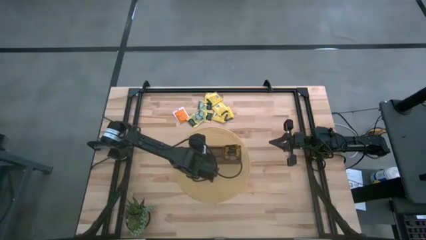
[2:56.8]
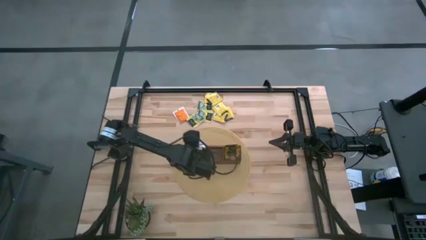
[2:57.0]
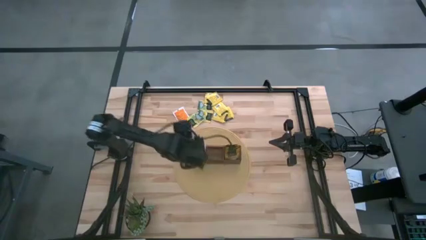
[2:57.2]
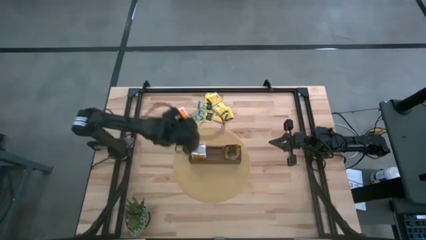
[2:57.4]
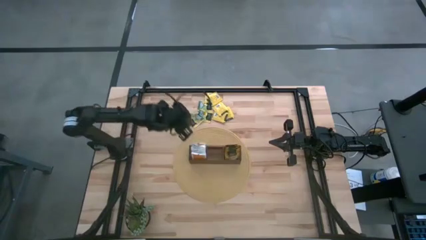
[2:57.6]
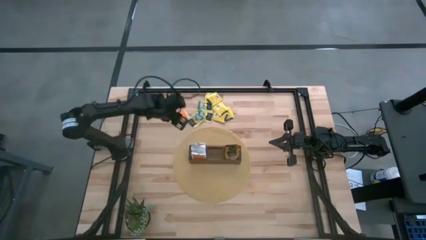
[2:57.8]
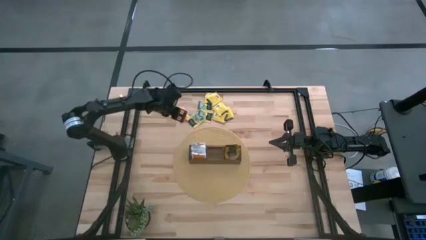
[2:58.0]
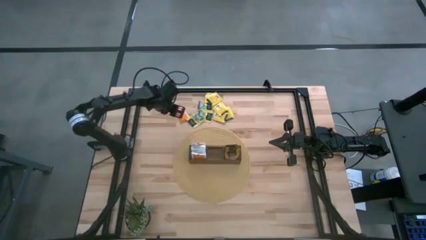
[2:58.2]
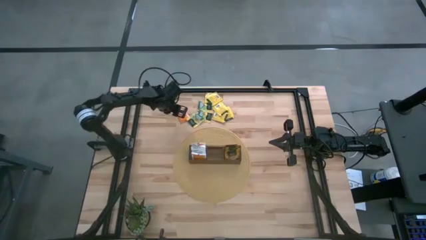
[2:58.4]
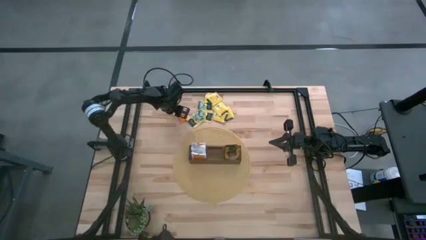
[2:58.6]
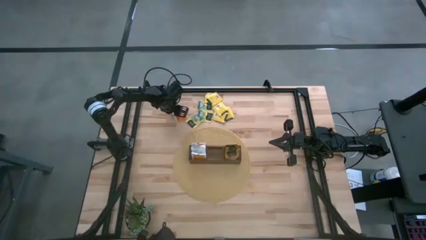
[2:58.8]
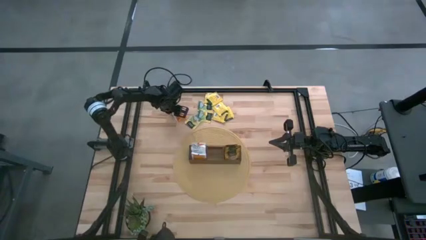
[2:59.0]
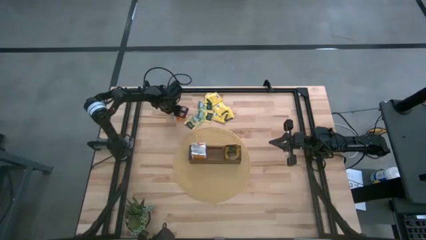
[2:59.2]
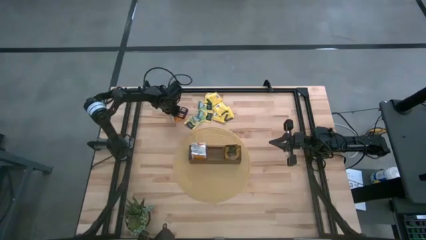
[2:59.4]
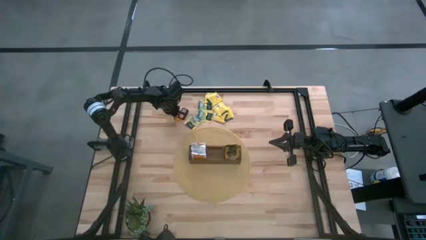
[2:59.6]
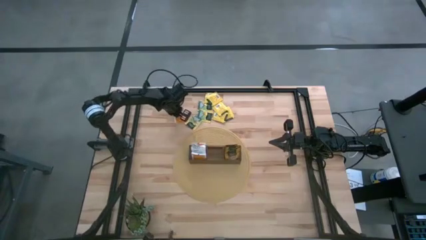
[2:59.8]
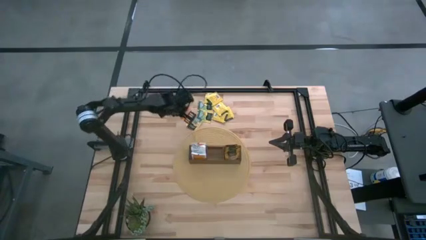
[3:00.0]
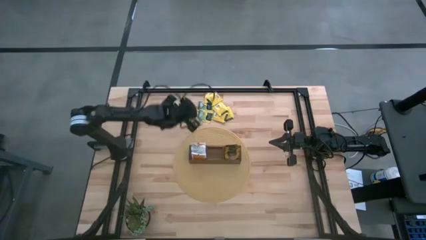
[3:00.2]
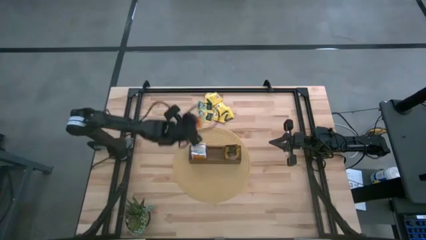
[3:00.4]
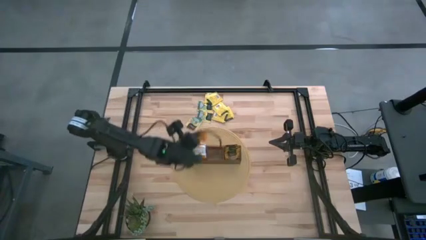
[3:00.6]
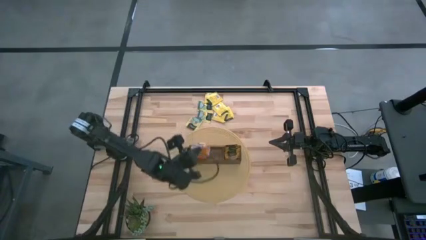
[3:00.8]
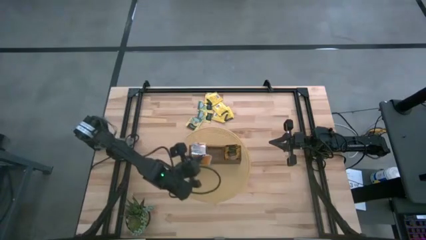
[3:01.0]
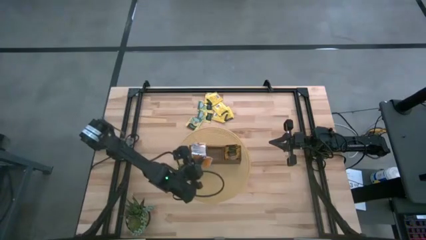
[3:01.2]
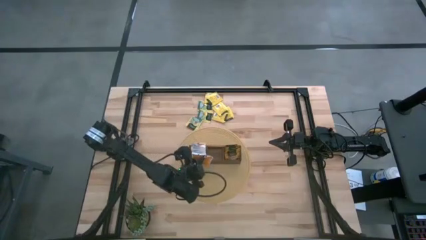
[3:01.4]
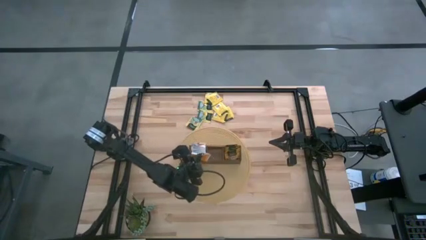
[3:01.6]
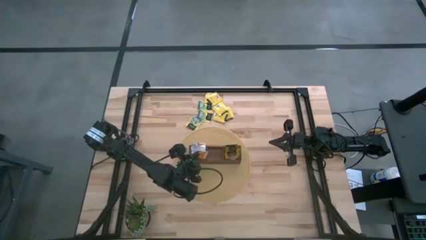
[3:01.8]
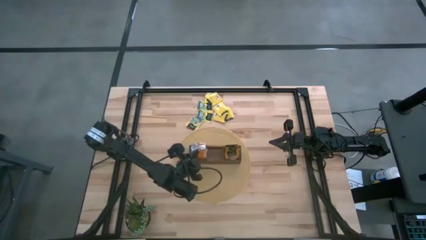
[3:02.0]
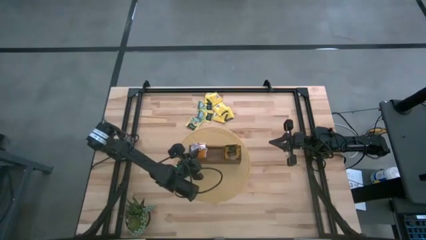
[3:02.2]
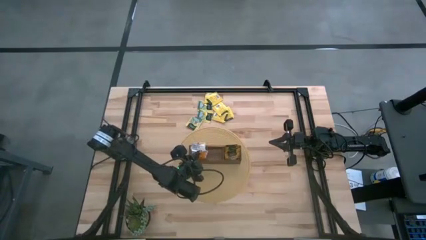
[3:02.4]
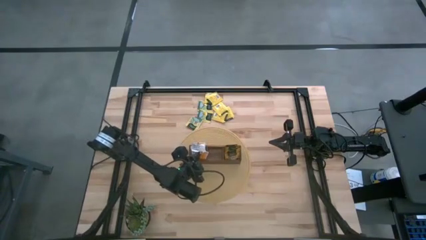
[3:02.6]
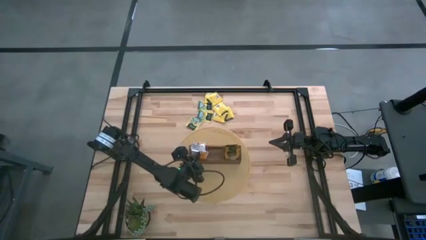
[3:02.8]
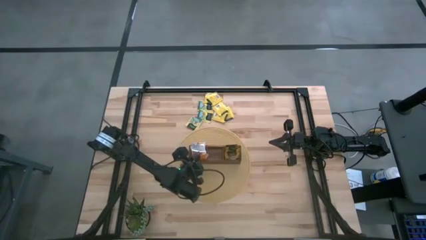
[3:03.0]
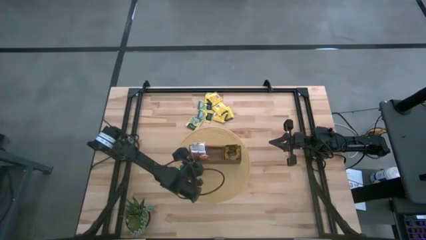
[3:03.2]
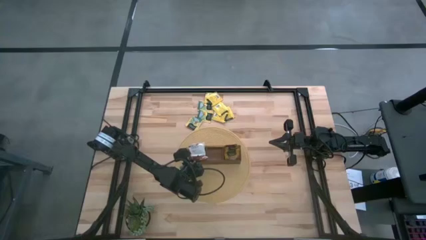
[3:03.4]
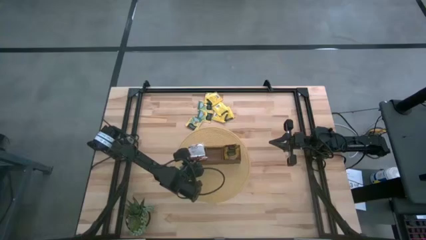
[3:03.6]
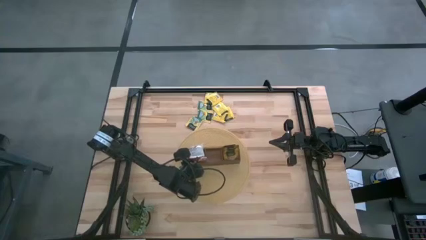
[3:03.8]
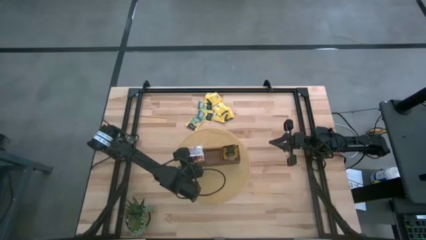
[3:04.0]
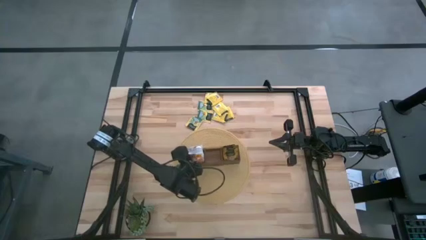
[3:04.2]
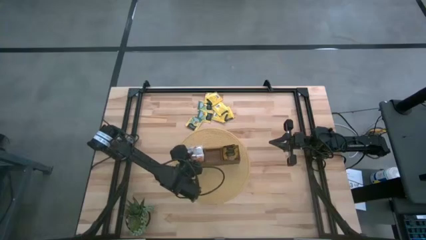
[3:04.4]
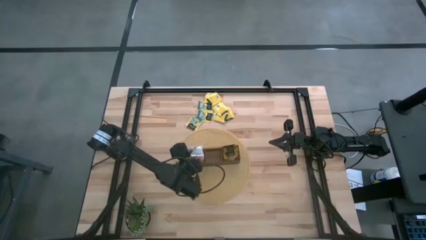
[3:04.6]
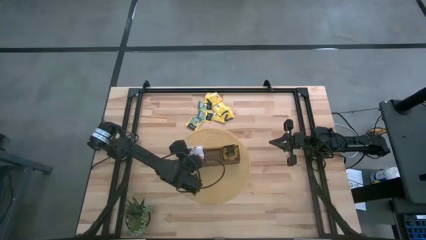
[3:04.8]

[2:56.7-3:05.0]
Task: Pick & Place Tea
Put the white and orange tea bag into the wooden organizer

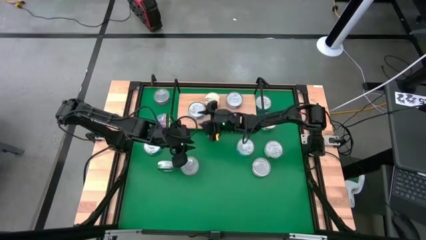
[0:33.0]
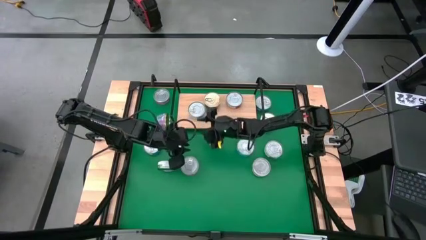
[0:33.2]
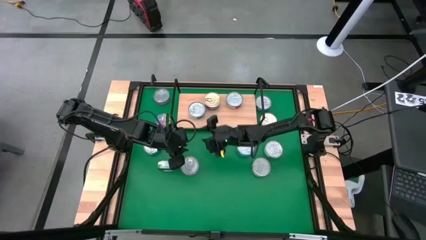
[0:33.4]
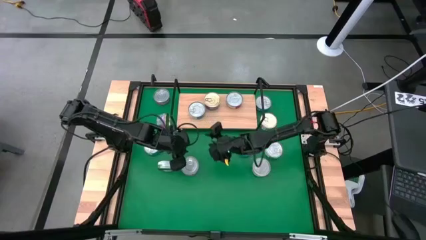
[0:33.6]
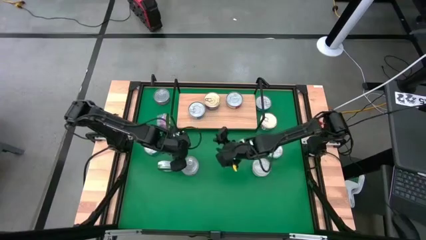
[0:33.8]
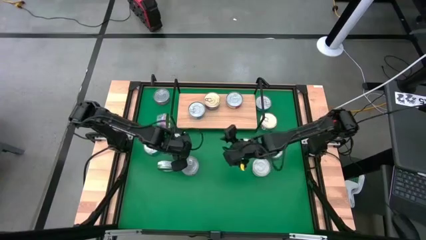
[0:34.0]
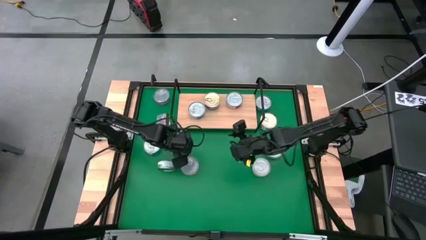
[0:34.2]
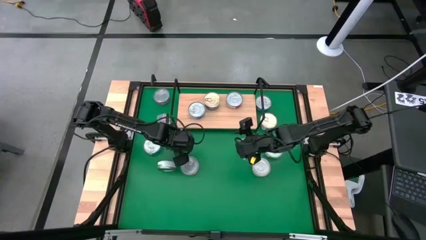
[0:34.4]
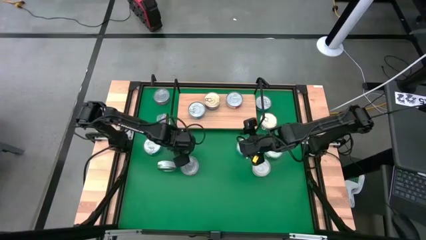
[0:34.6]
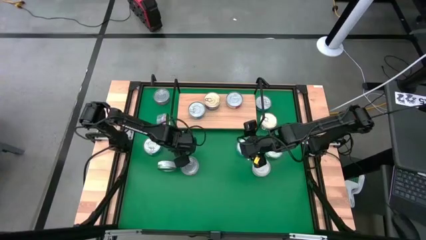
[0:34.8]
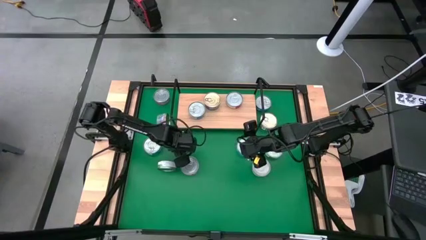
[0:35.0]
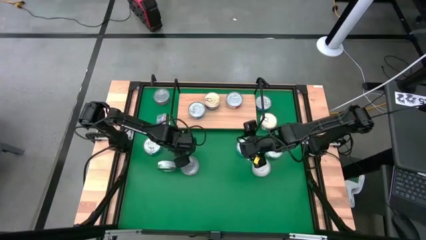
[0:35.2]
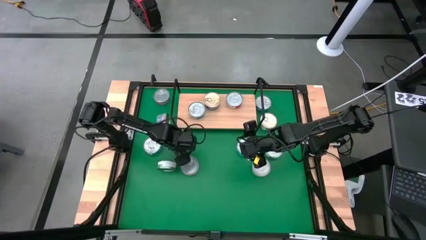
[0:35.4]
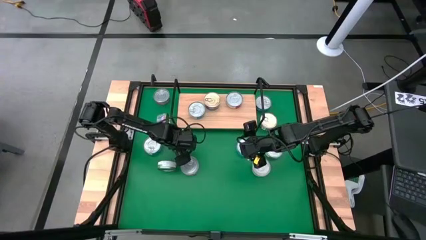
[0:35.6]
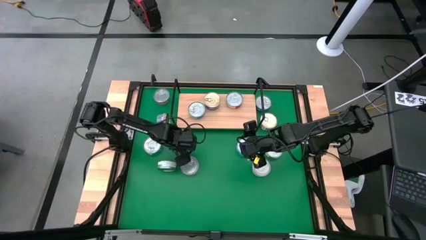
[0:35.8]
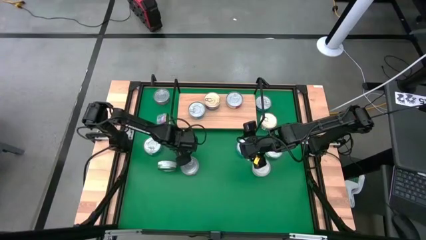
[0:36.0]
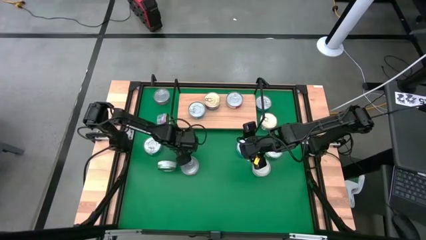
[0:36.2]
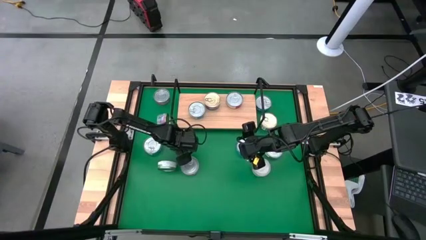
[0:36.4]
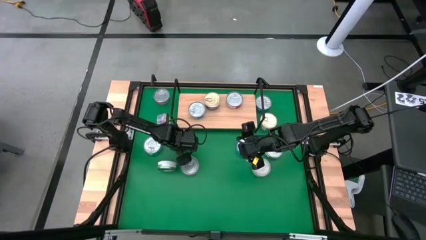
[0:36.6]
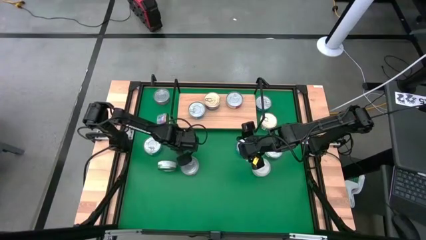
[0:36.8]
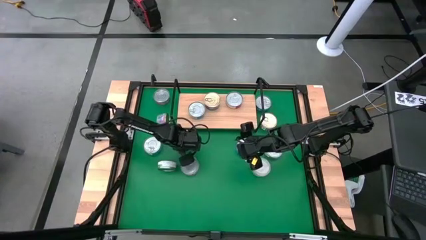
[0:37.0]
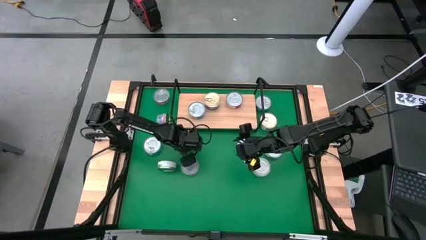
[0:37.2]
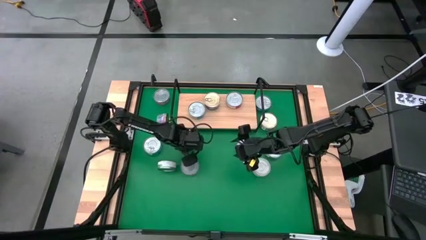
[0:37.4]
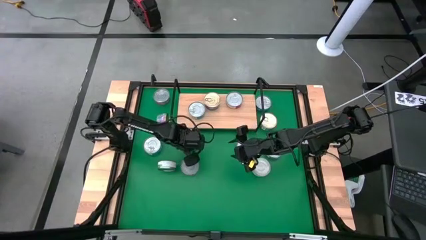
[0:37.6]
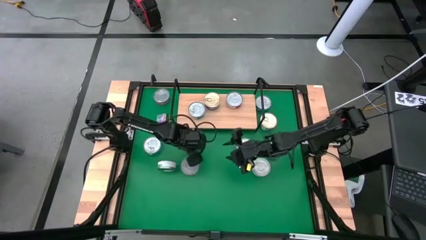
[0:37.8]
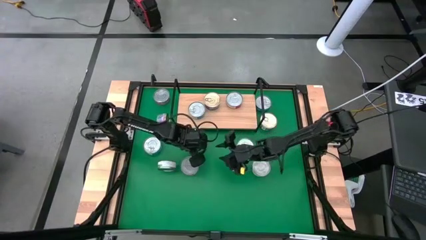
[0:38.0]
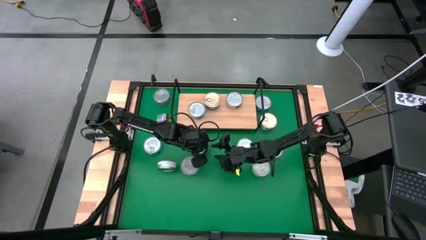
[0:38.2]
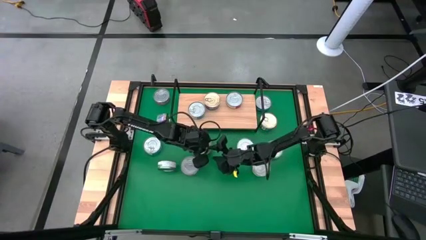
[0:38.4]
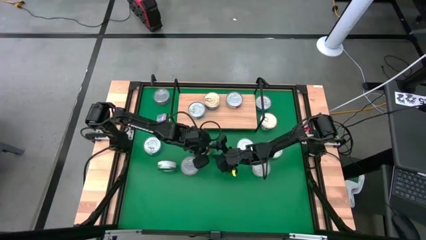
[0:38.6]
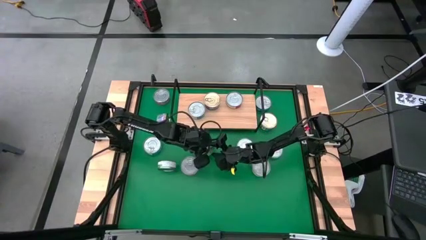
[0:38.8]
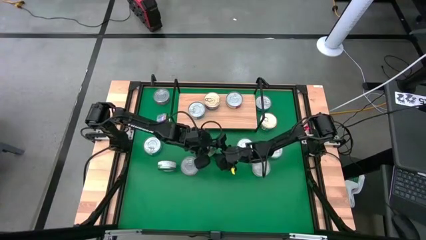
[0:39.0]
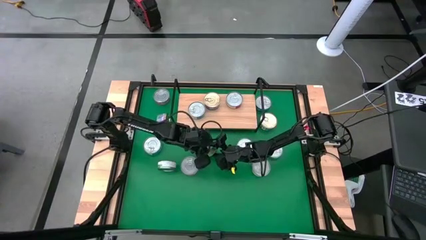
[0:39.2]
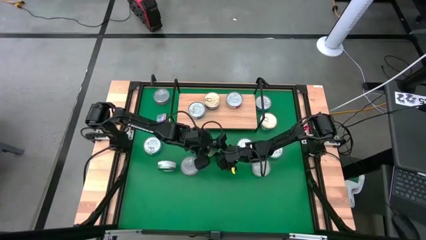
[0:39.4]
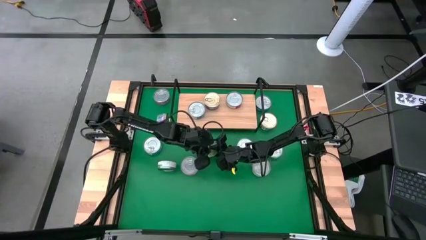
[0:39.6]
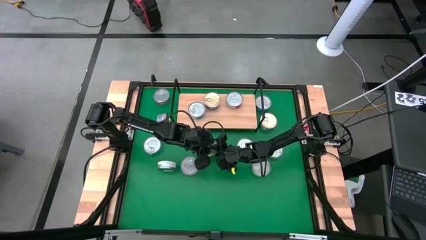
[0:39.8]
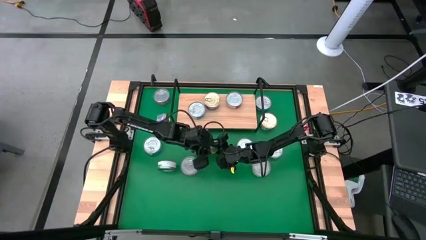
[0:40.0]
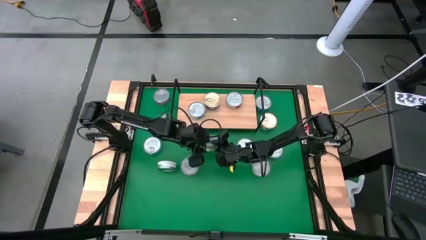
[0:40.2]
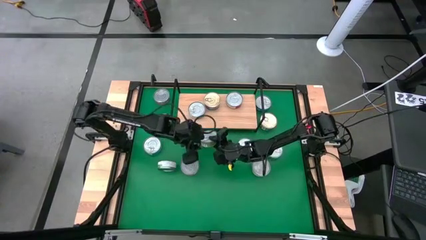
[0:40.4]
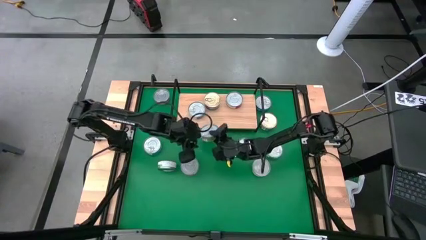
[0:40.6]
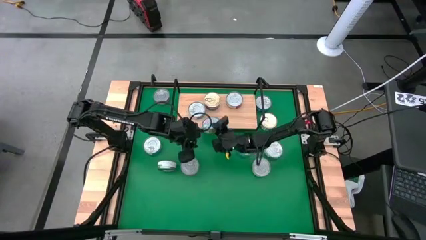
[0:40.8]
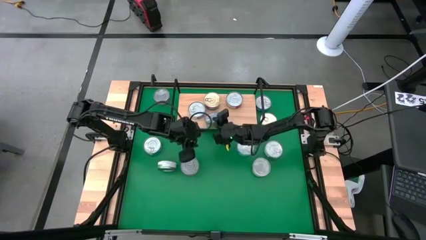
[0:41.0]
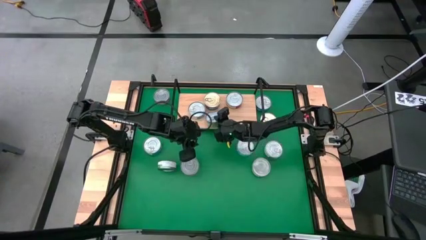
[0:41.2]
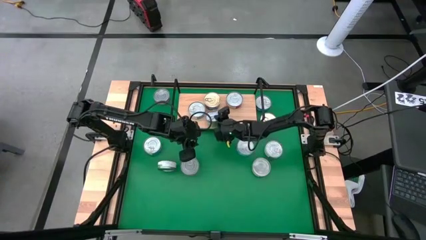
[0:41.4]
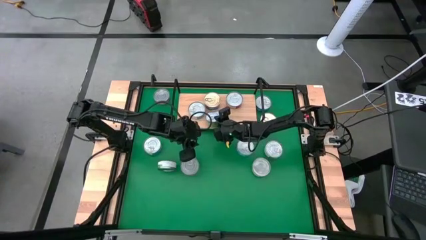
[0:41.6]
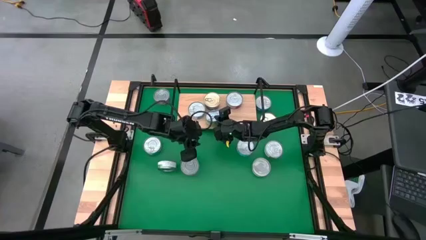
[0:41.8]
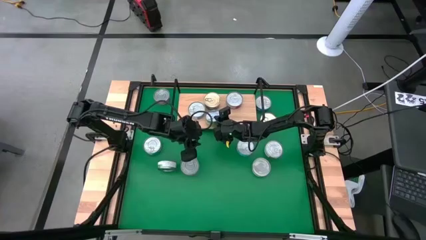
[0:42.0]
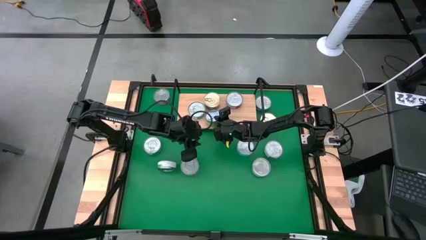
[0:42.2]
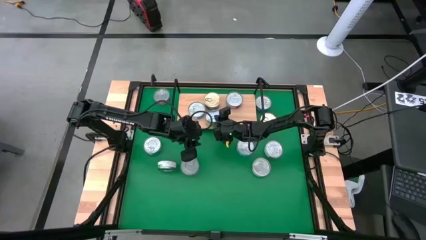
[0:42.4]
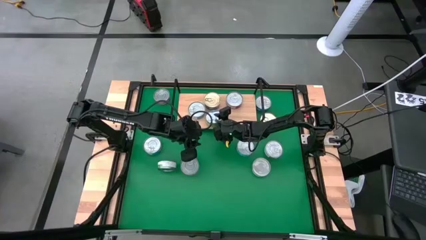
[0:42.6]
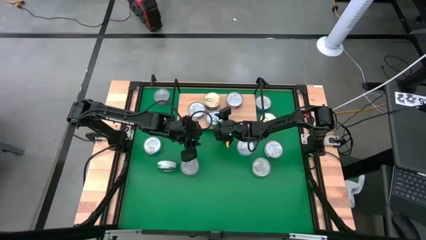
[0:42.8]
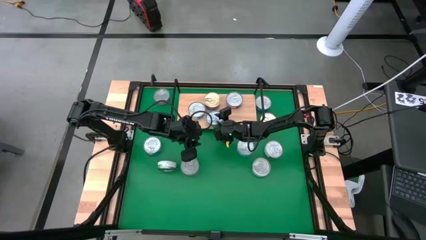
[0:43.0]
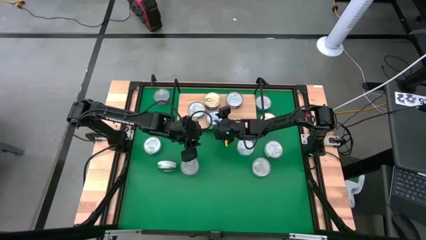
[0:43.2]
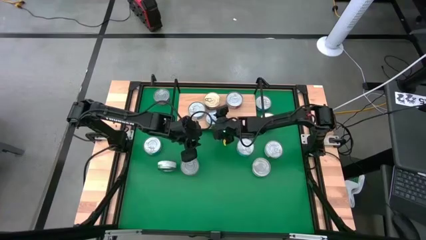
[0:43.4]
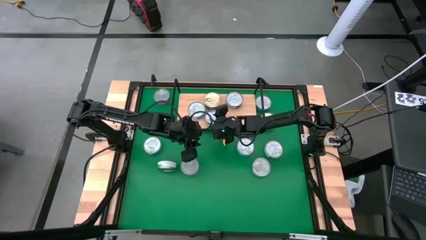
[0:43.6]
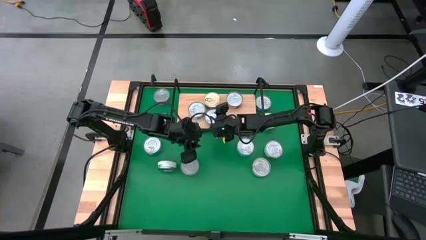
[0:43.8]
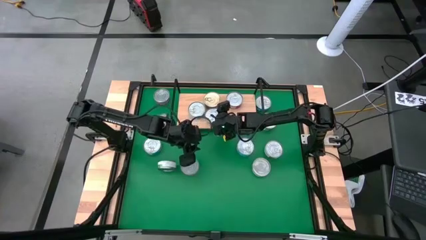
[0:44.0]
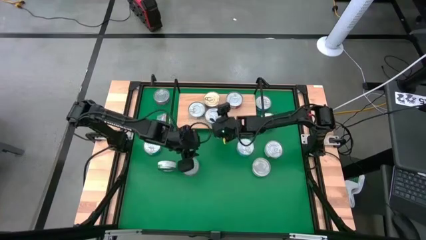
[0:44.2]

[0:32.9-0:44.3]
Task: Stack canned seafood by type on shelf
Put the green tuna can on the shelf
